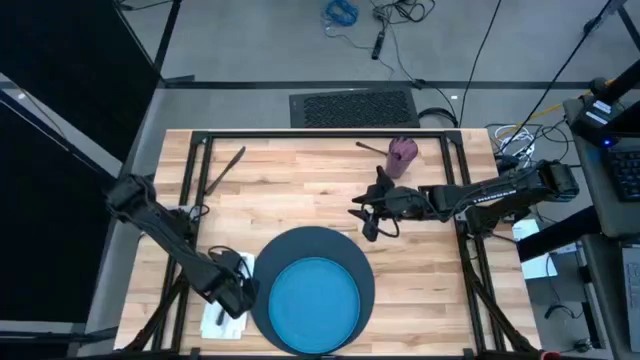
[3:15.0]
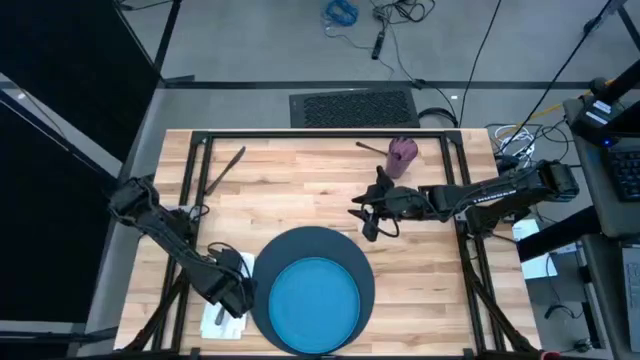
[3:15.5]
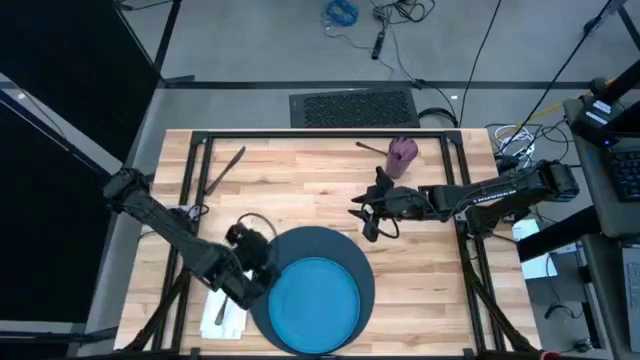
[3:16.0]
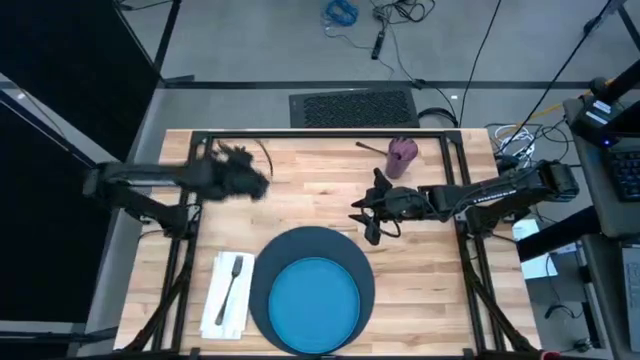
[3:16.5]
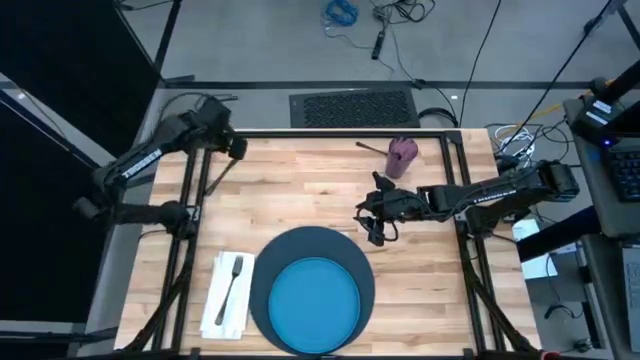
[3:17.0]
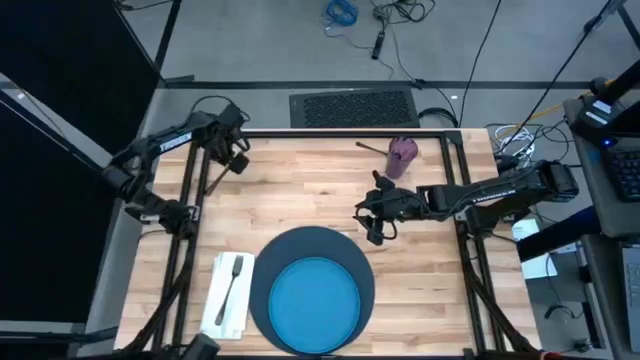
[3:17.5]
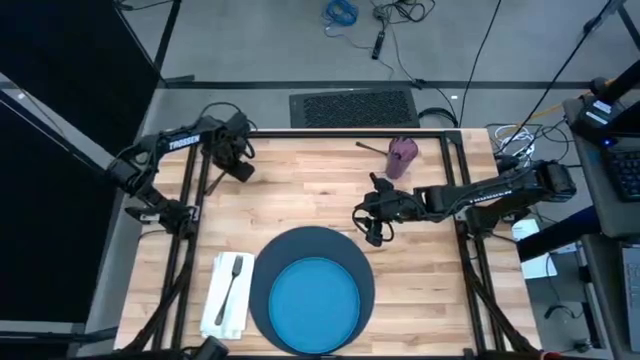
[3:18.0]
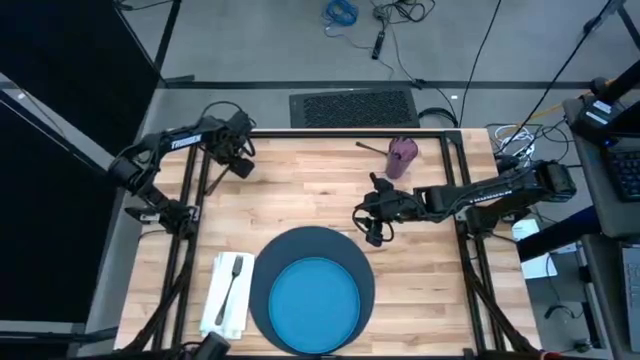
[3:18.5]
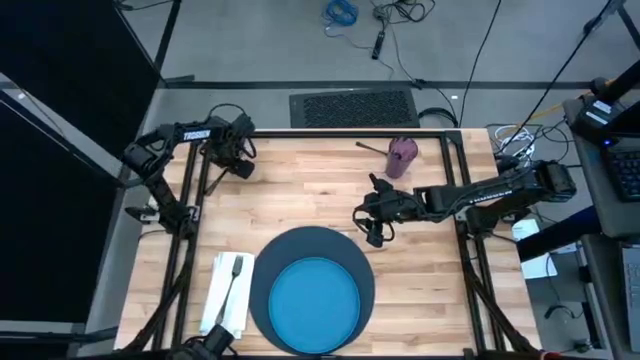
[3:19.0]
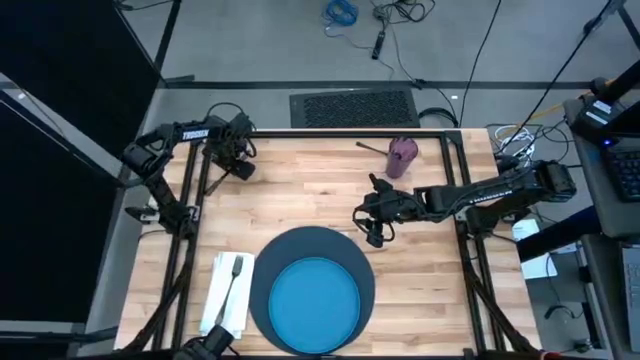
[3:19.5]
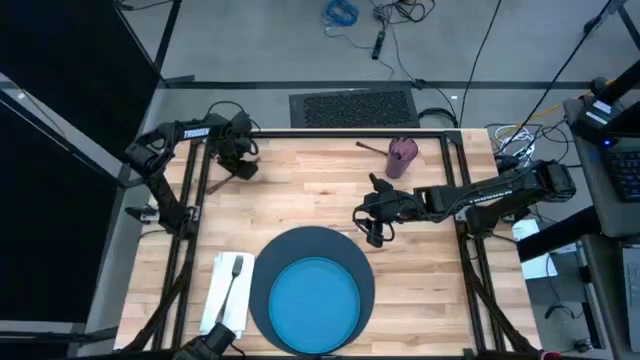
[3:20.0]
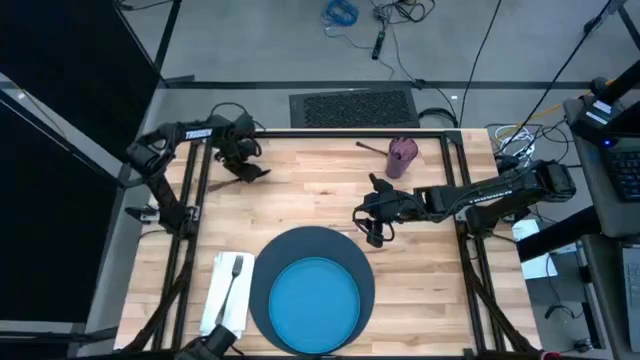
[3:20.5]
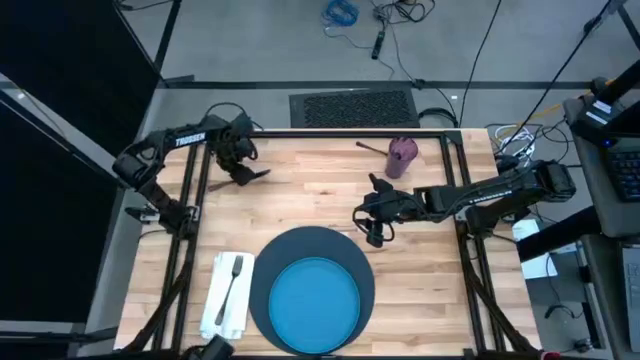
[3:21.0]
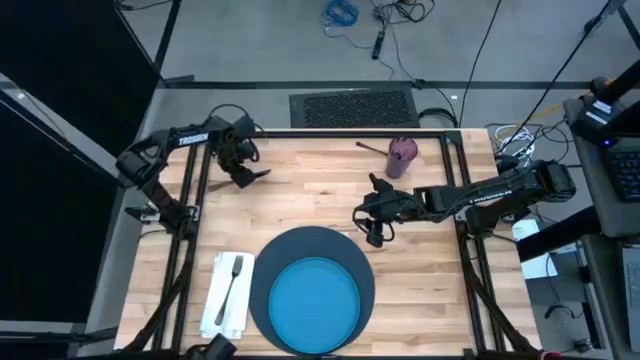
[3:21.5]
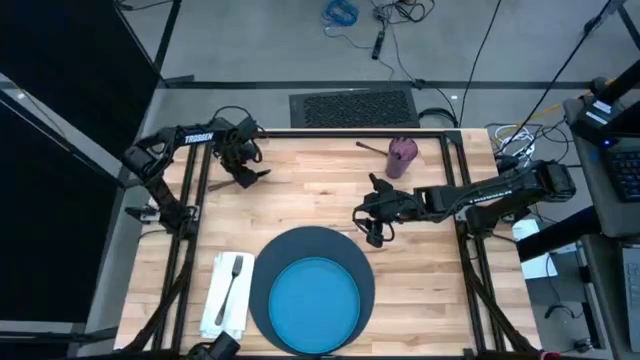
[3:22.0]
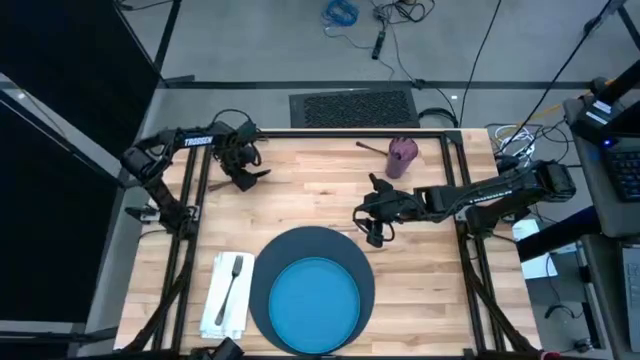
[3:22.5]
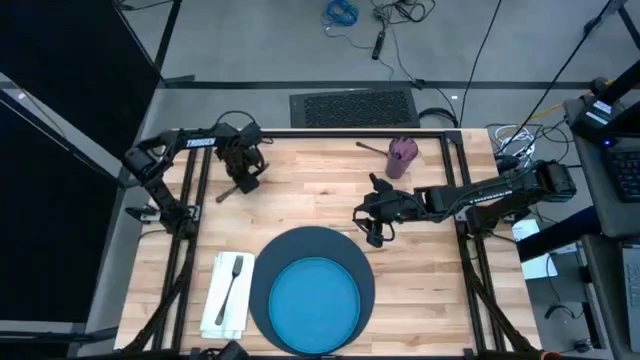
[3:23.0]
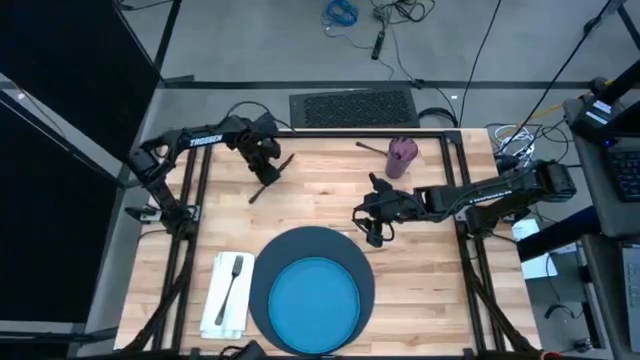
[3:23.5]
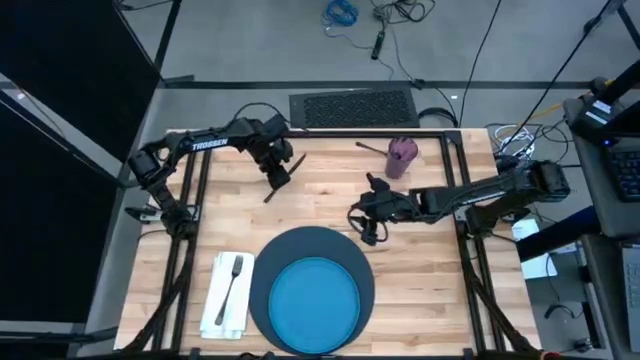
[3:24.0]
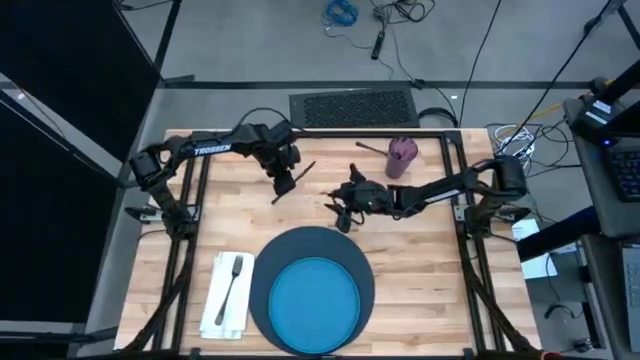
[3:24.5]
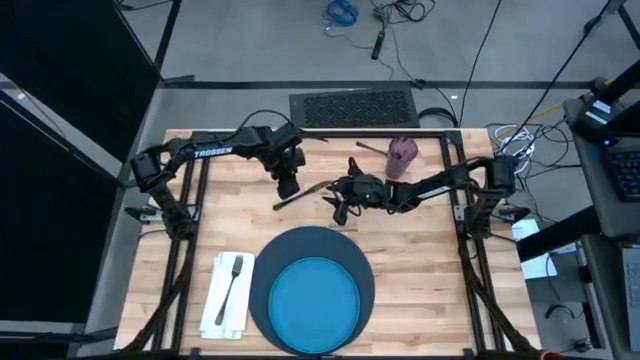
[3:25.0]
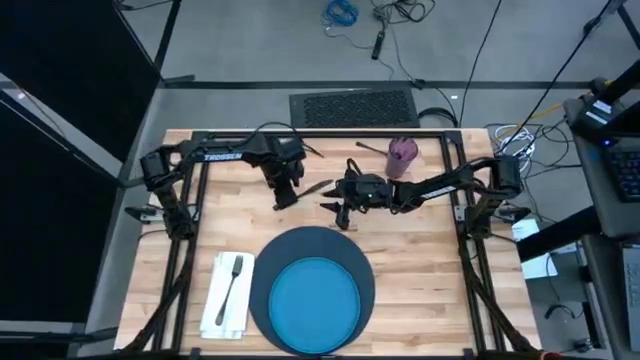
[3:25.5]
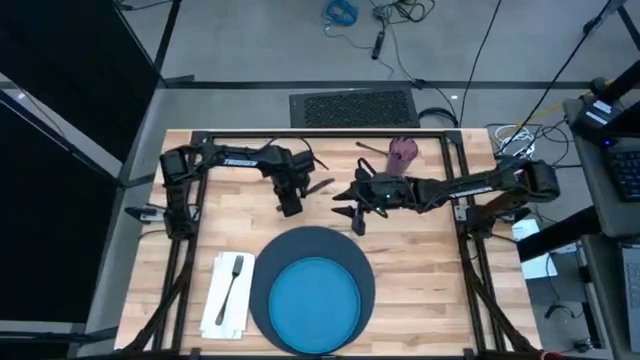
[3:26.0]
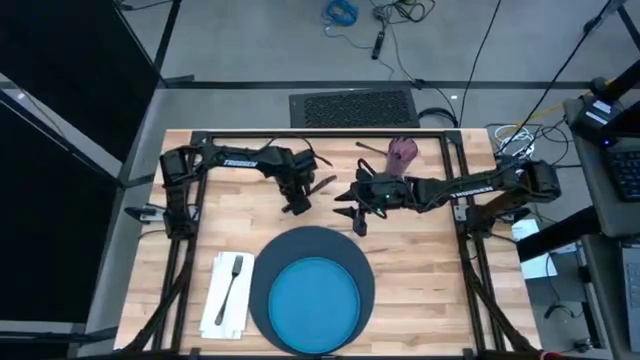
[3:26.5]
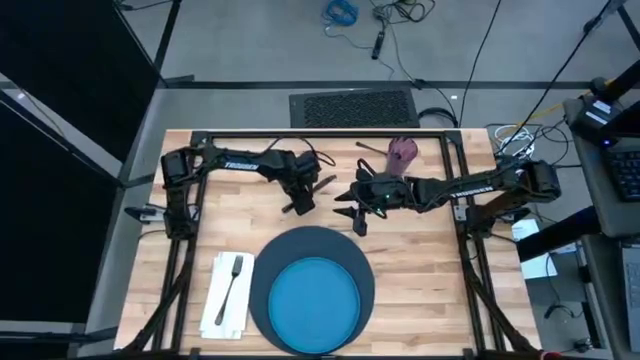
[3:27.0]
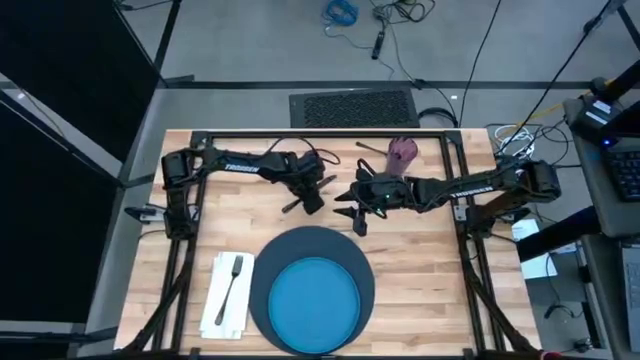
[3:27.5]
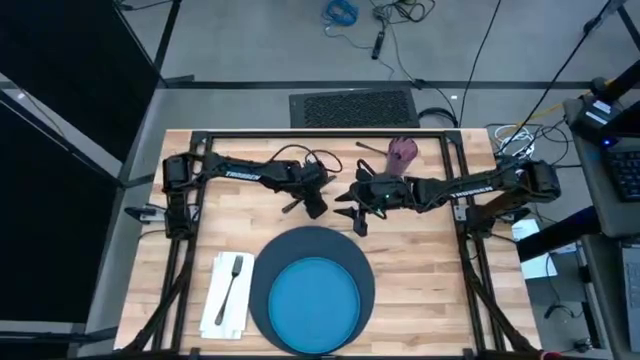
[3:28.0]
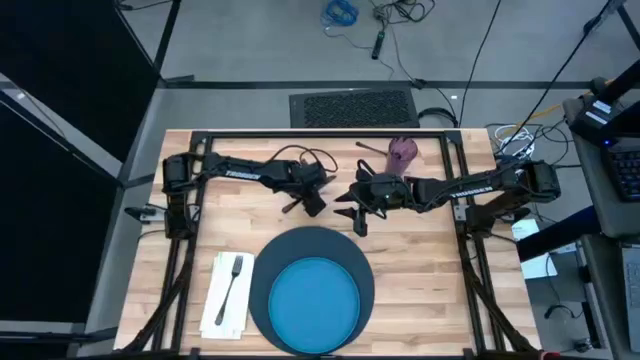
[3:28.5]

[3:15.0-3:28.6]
Task: Set table place
Put the knife to the right side of the blue table mat

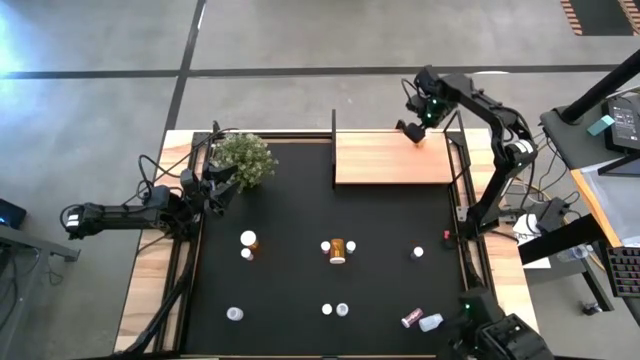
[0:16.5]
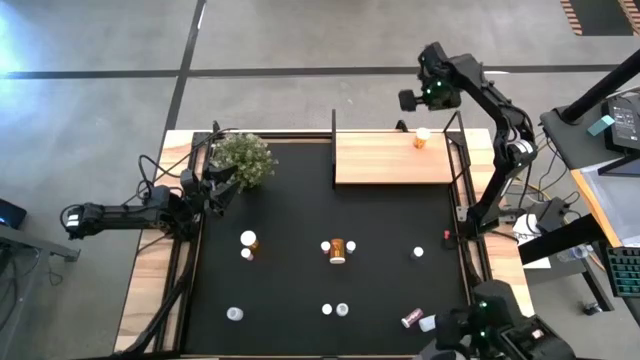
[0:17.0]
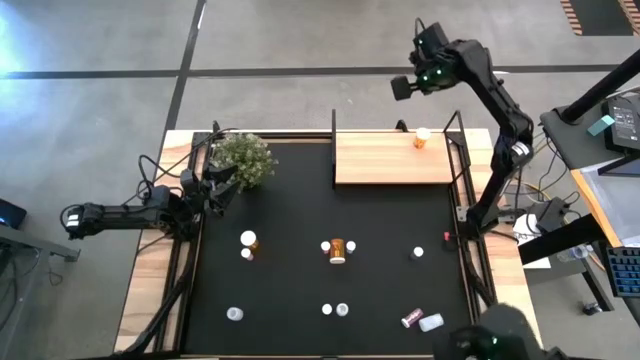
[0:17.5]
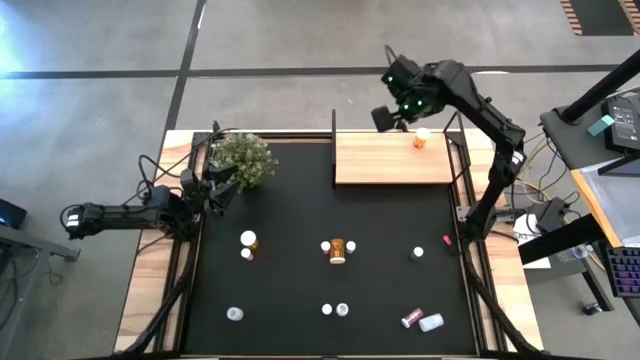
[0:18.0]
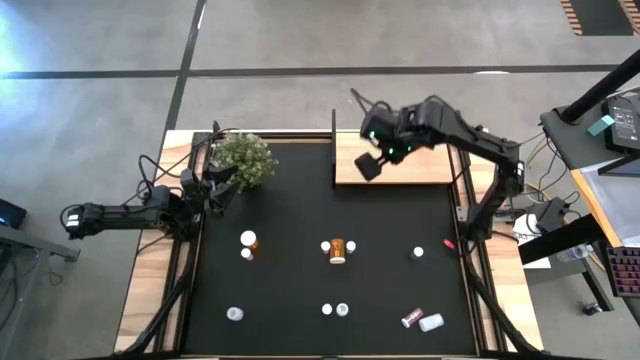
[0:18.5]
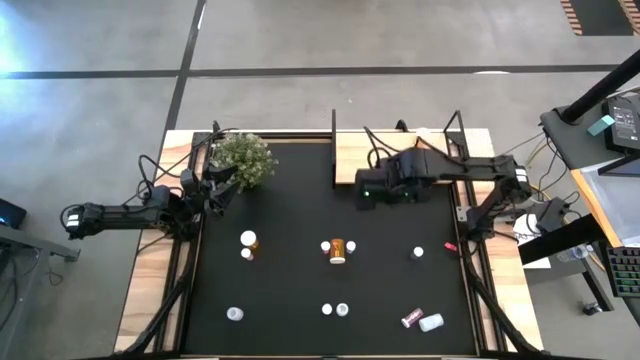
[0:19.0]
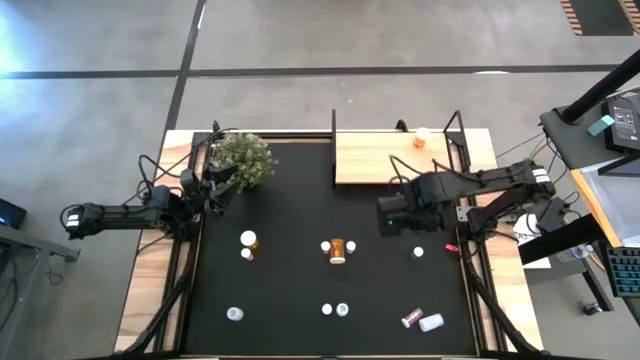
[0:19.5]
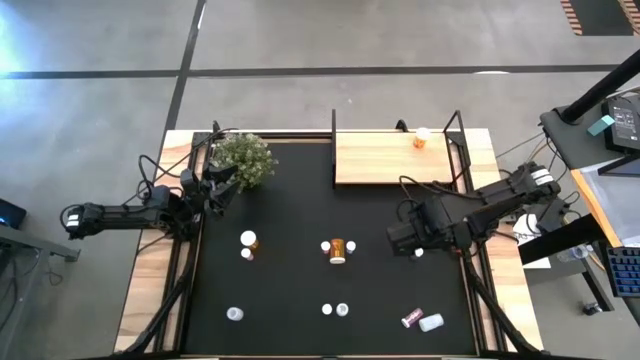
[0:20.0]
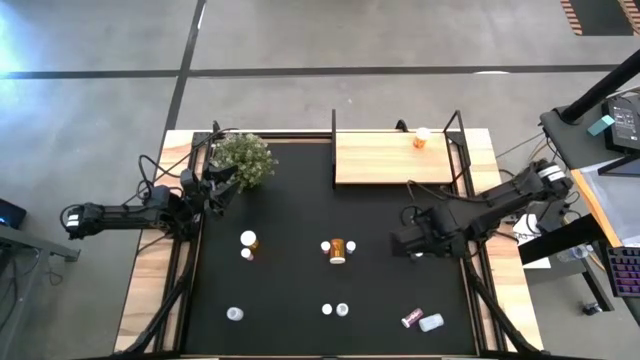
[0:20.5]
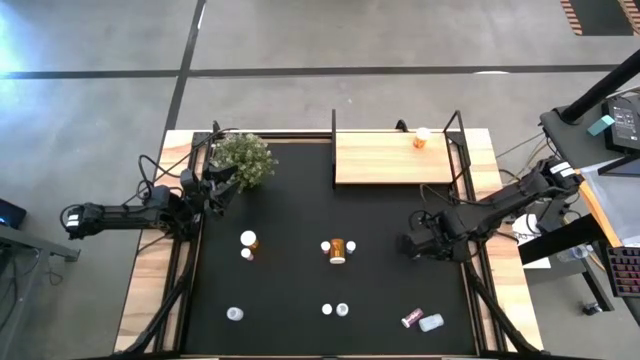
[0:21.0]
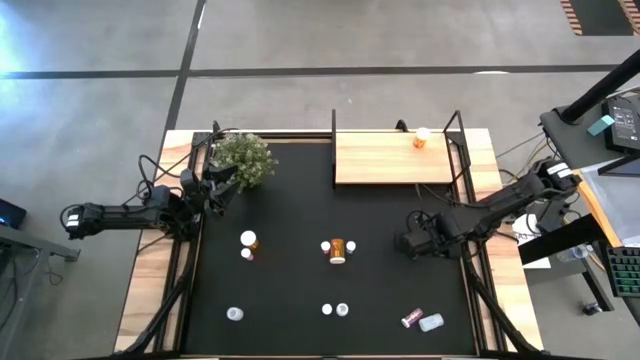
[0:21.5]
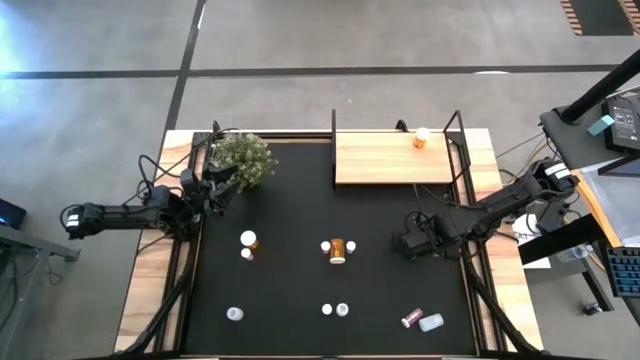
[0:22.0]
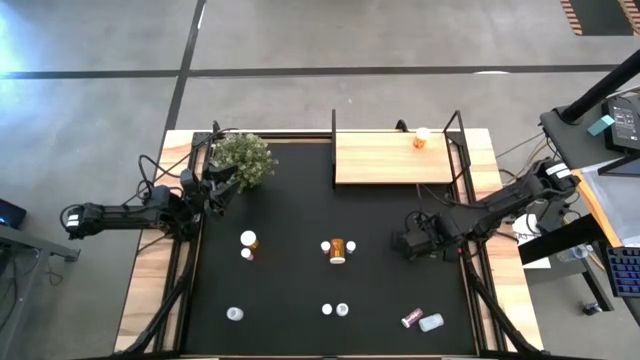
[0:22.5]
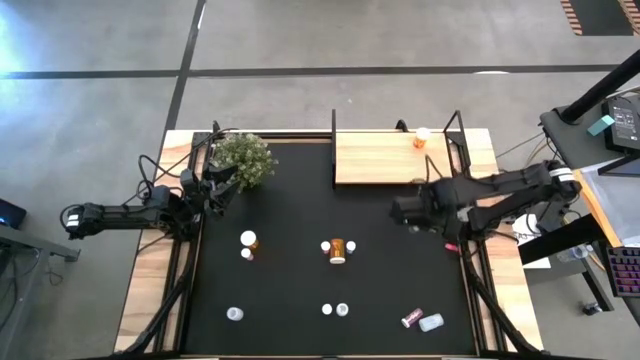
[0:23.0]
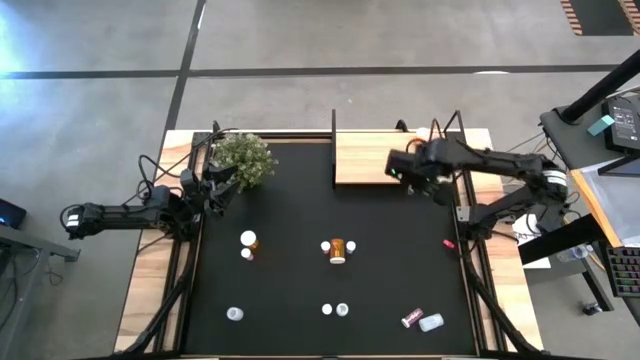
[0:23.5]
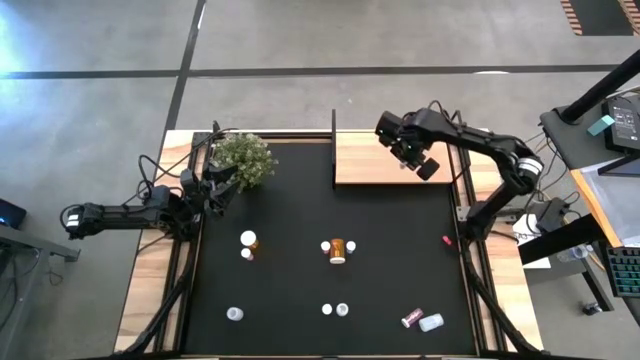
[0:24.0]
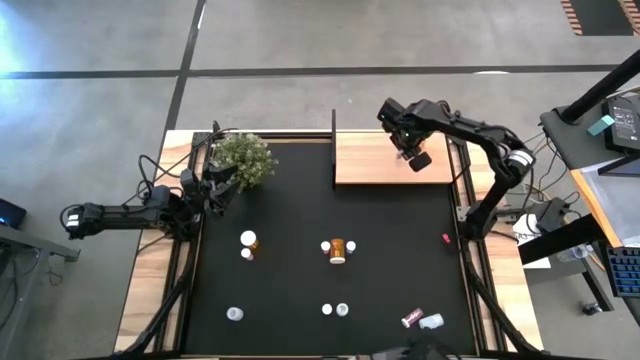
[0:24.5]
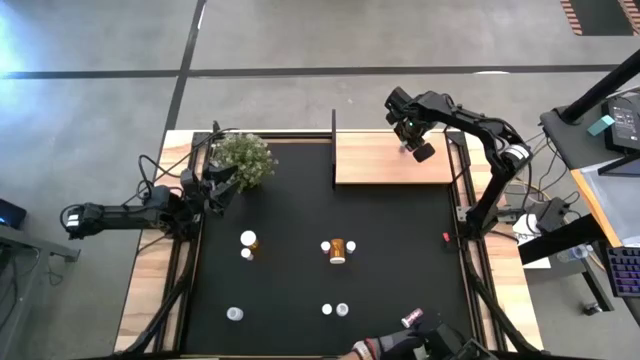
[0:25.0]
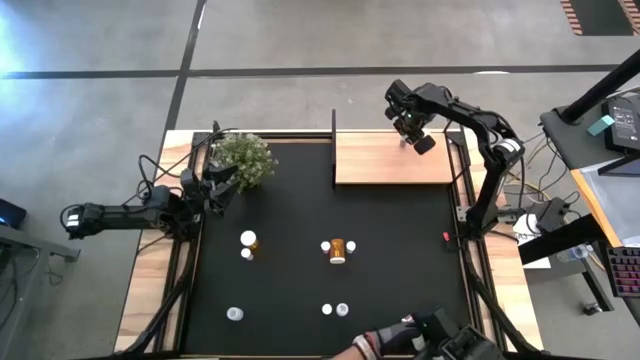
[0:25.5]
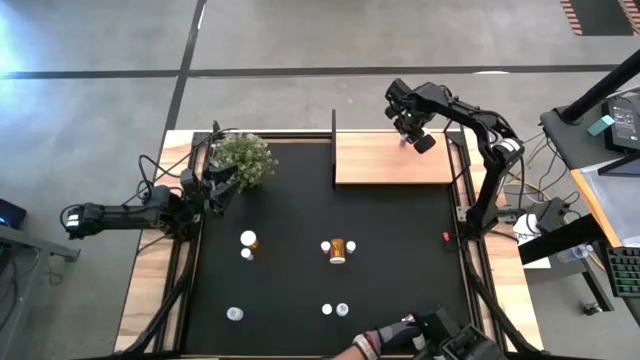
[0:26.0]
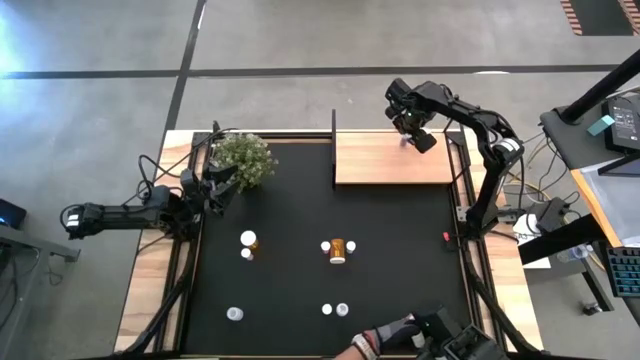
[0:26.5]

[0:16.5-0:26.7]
Task: Pick and place medicine bottles onto shelf by color
Put the top right blue pill bottle on the shelf
